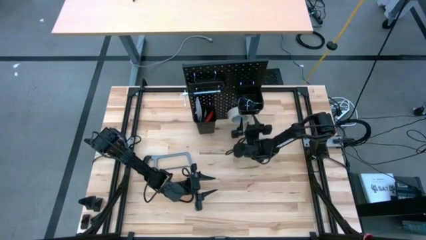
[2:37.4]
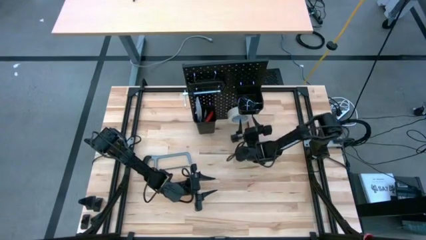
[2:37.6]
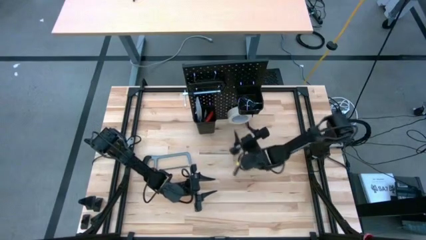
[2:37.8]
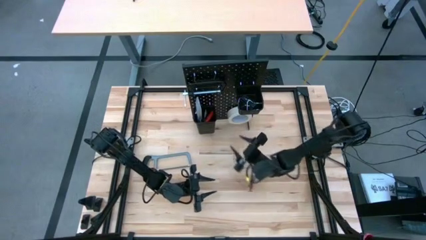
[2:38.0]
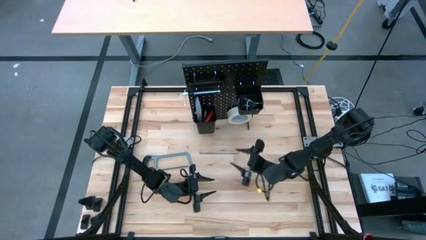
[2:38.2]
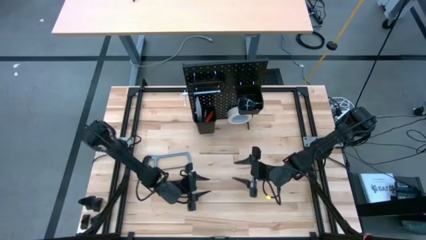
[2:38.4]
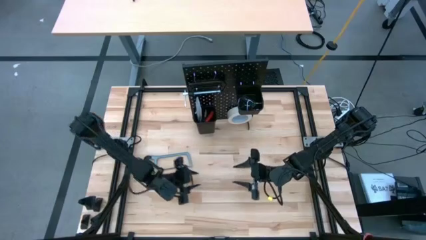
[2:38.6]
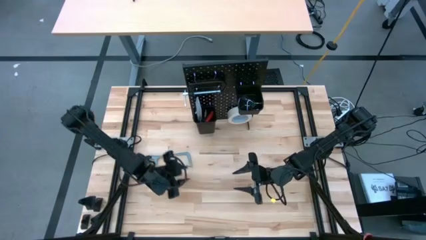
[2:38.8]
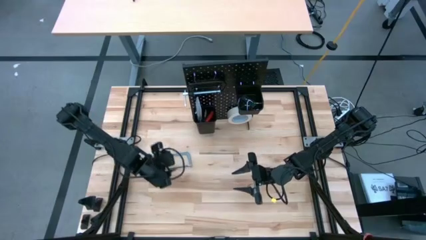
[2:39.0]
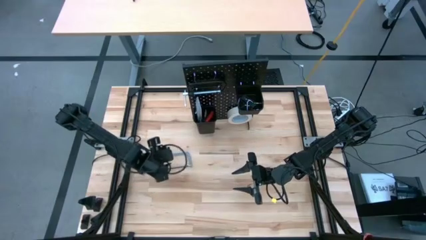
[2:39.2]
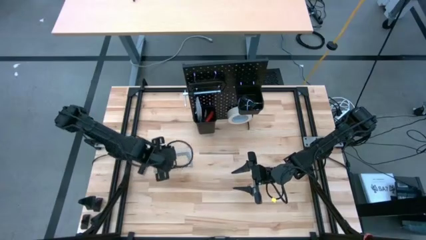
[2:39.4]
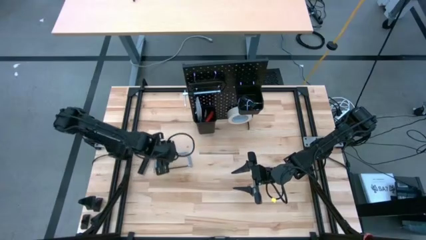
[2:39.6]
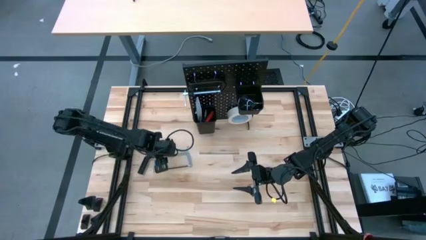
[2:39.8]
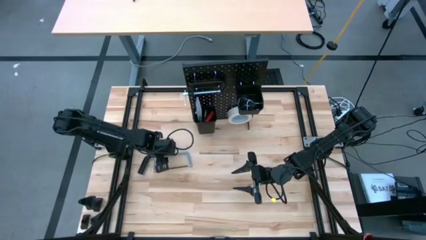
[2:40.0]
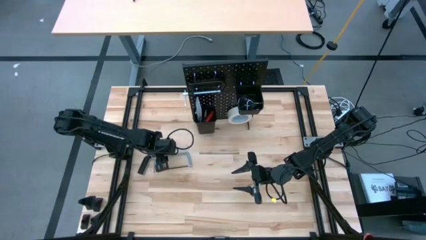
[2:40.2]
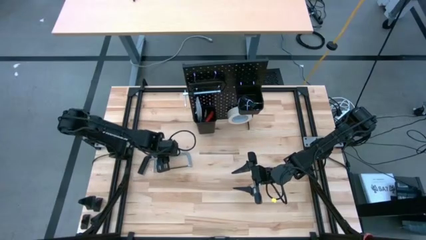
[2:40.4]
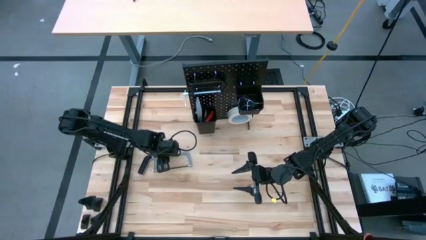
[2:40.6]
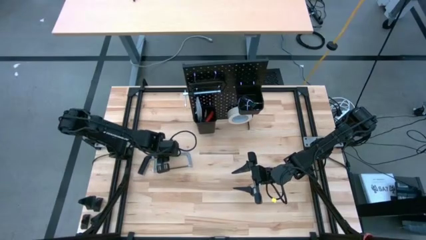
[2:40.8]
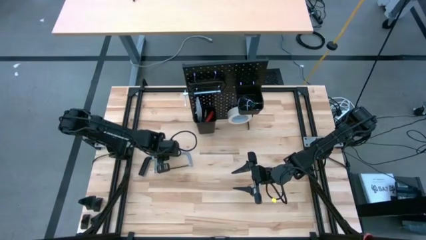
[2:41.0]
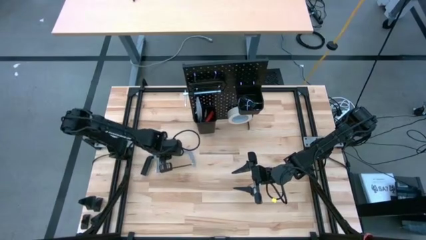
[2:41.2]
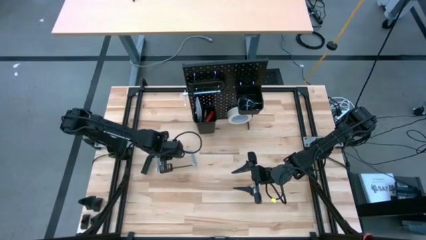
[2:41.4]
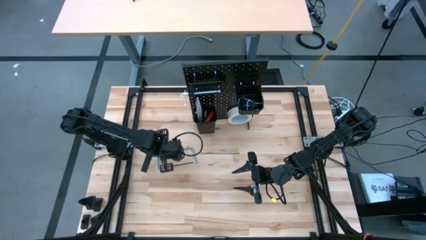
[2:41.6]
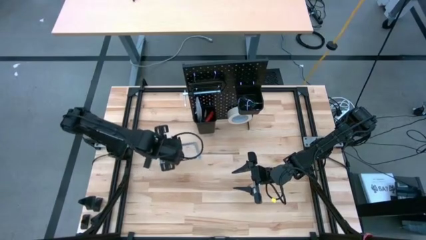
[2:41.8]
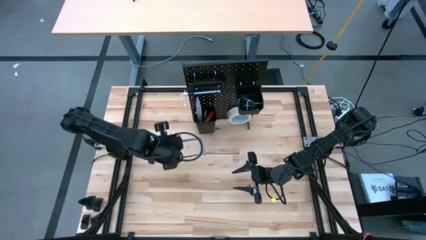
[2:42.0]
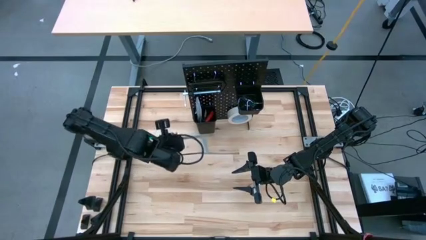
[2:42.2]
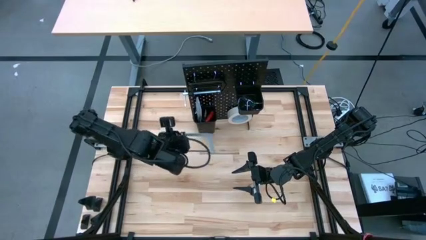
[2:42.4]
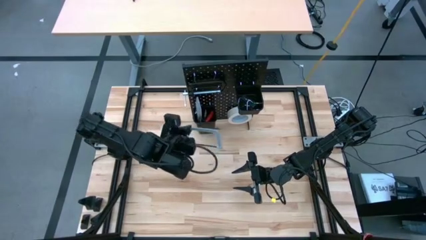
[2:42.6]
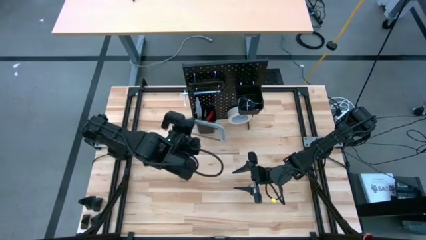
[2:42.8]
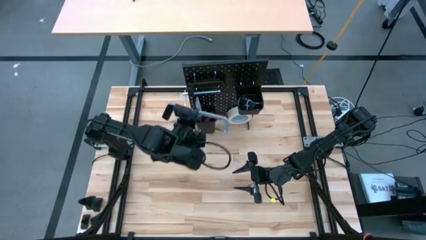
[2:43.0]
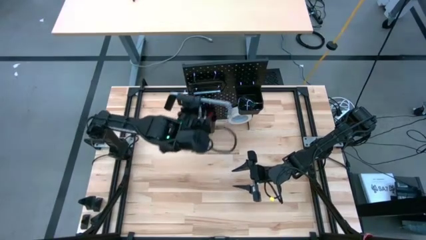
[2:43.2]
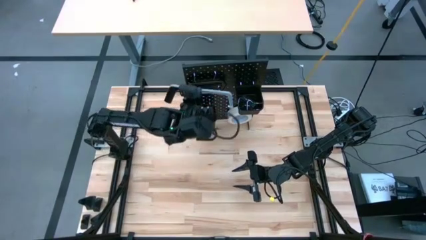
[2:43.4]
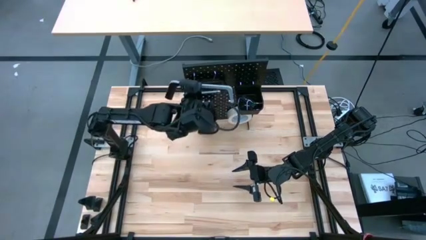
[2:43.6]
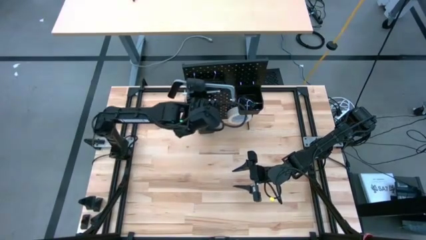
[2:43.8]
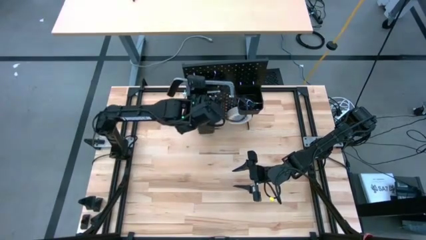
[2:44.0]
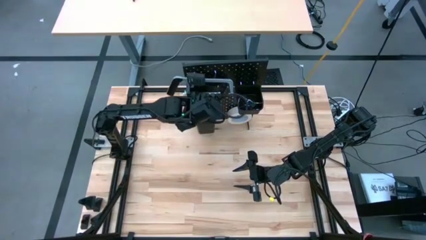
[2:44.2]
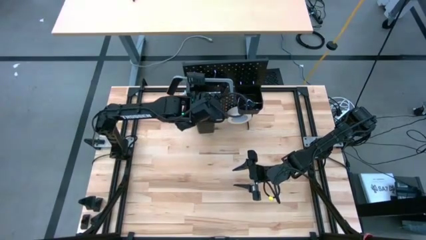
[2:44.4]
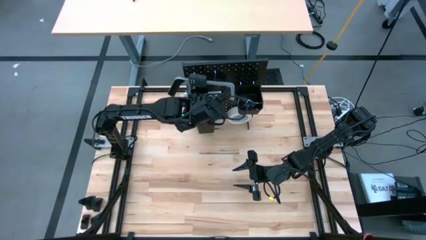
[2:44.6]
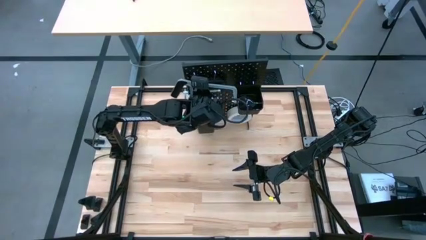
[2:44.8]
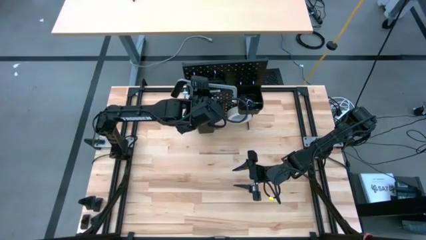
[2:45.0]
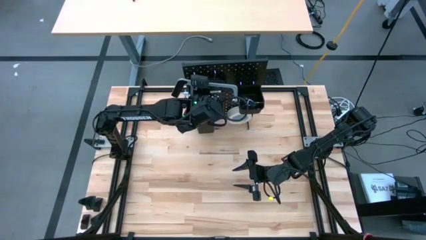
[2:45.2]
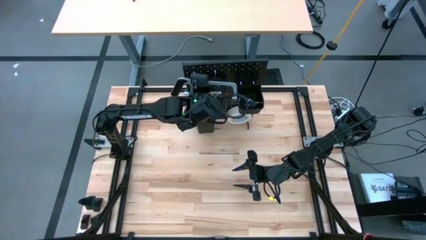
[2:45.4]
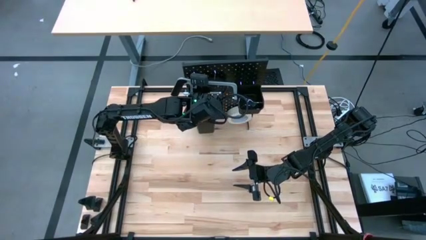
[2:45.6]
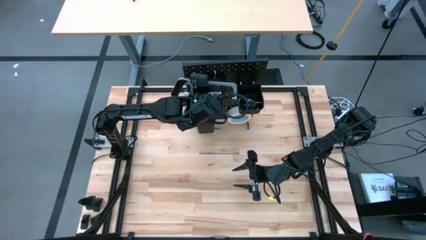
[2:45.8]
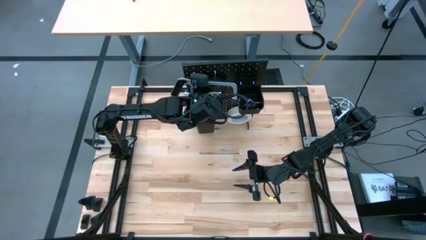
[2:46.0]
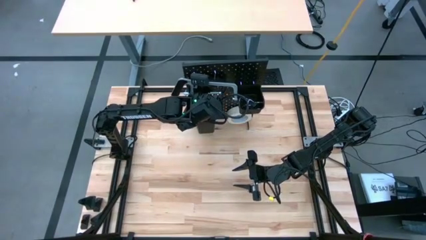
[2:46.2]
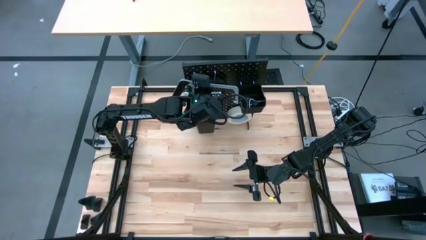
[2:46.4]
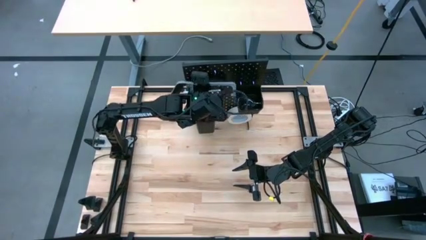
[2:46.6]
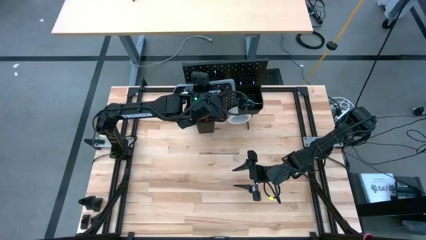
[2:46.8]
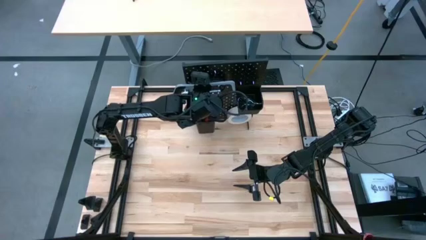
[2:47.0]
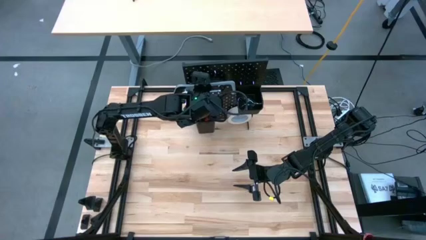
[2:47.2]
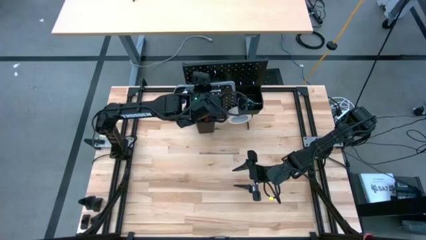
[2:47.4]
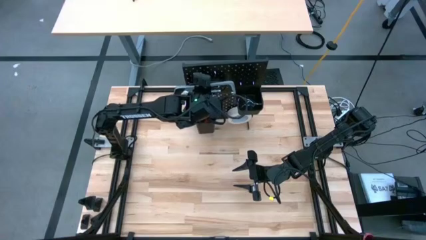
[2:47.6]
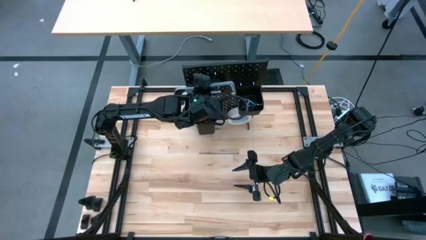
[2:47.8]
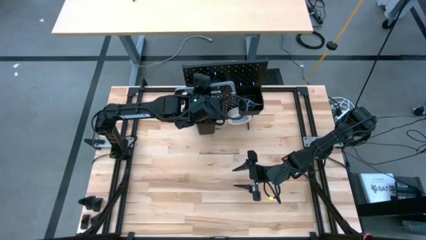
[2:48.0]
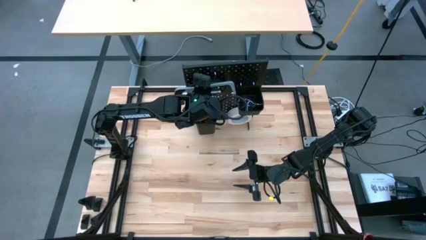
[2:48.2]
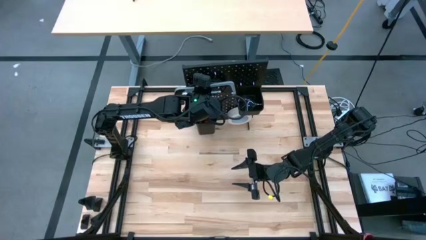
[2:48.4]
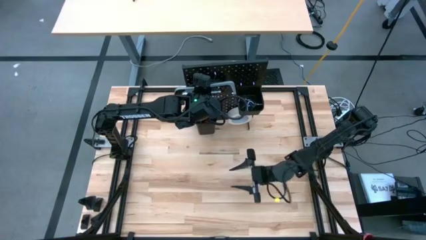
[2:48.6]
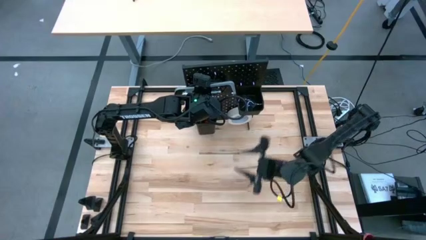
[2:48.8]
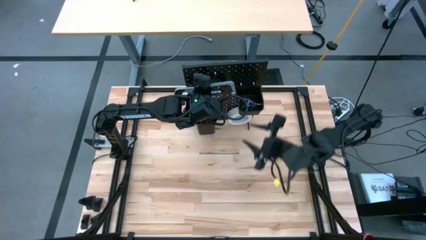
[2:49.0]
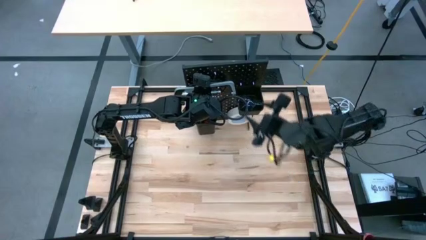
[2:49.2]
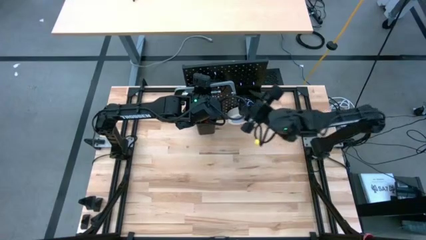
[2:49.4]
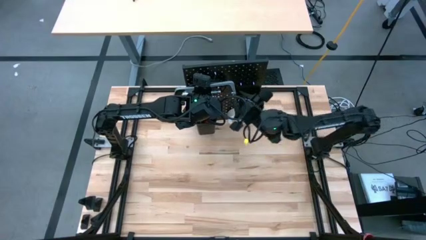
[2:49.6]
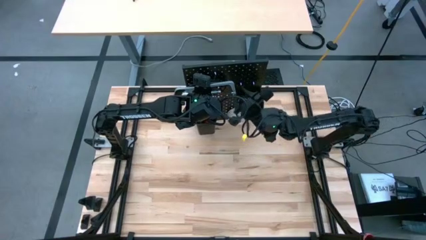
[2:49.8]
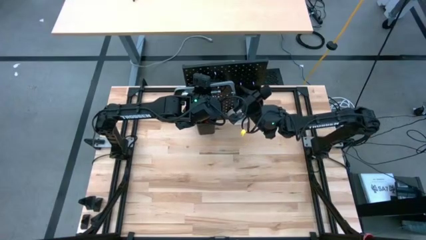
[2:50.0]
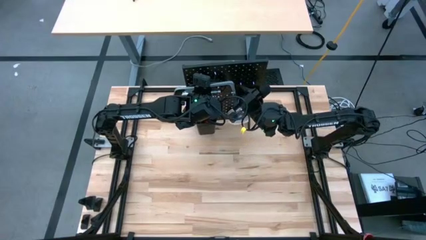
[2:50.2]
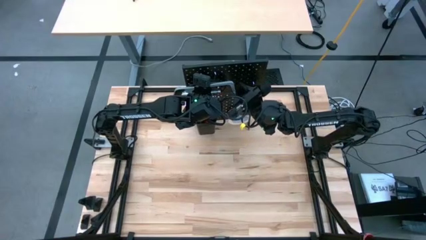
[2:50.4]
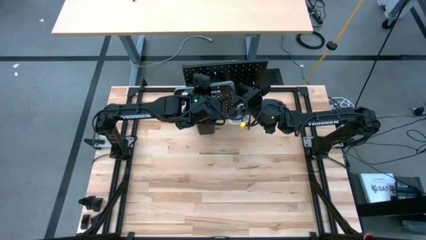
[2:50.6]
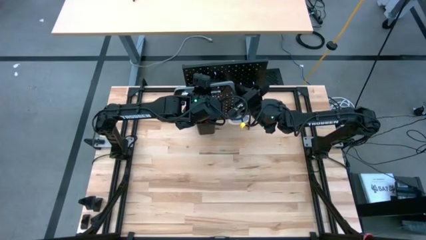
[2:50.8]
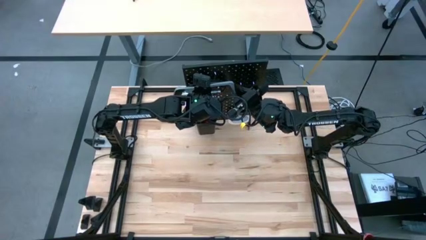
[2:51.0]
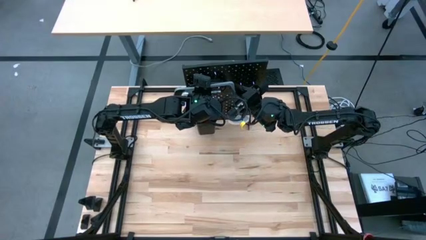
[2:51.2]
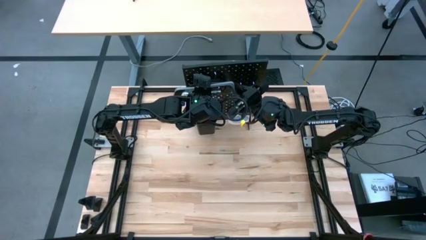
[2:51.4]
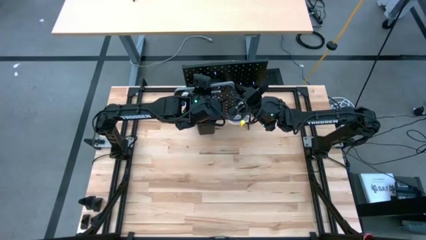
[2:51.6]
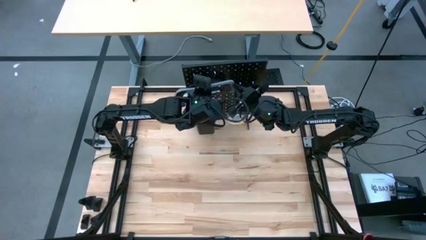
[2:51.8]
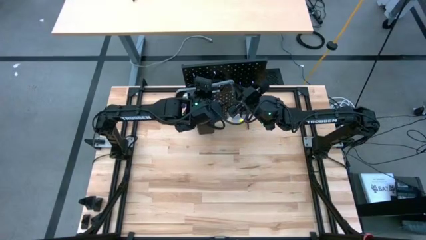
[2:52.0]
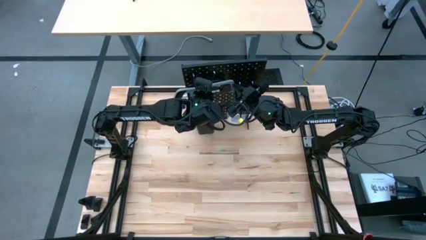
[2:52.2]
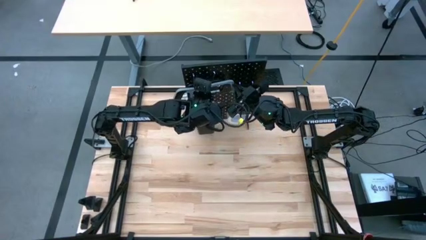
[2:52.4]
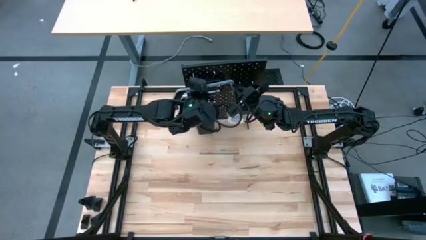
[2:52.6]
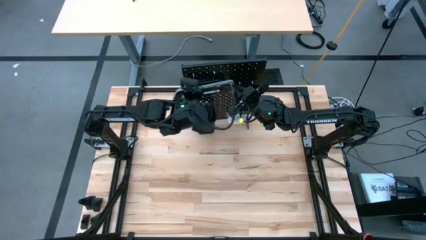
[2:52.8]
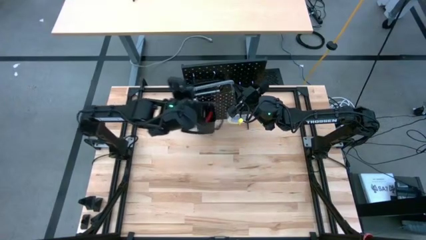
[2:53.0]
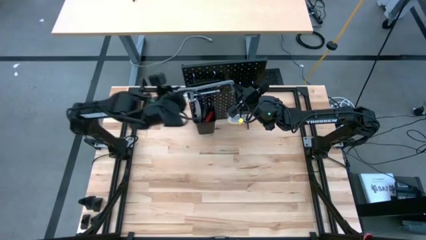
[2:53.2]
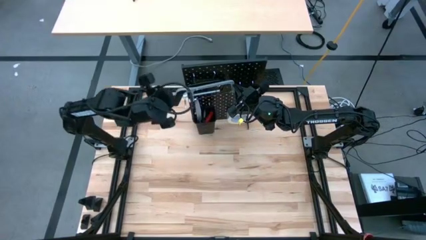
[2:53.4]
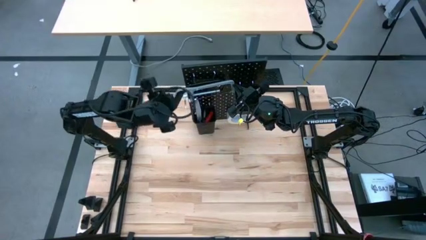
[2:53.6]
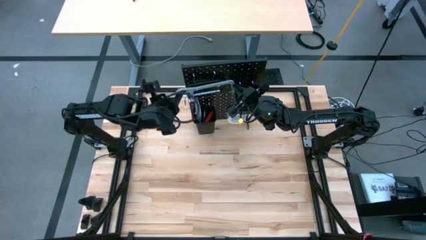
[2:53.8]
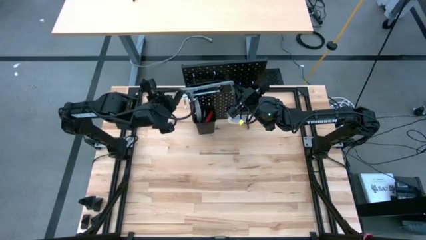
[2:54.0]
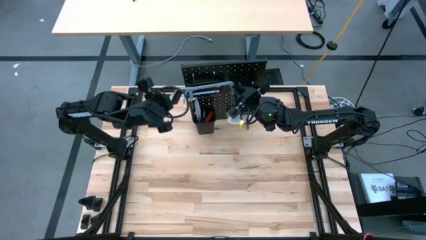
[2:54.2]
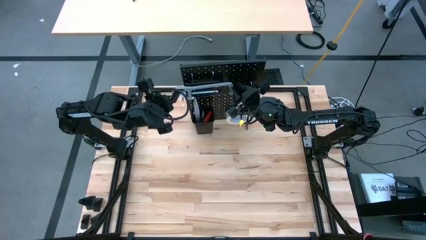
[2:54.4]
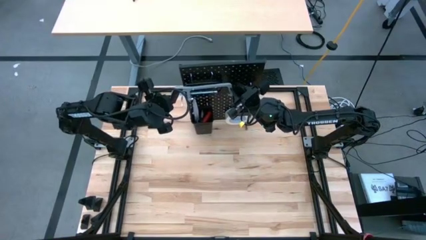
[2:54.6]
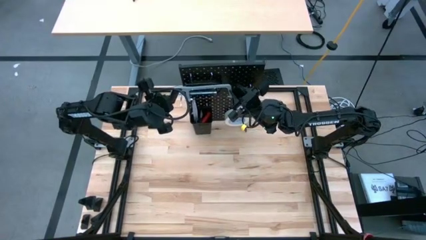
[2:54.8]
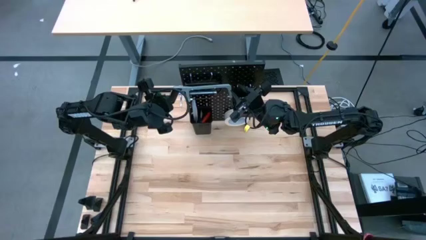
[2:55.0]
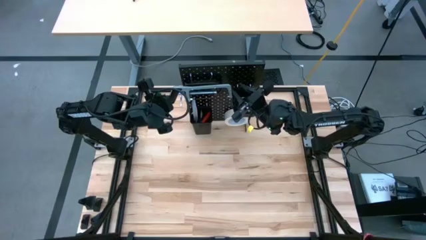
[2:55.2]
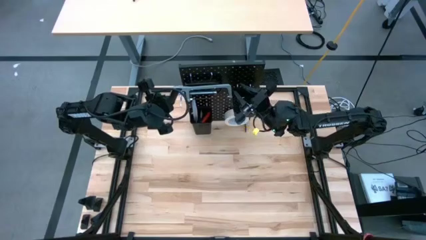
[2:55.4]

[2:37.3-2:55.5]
Task: Hang tools onto peg board
Hang the hacksaw on the pegboard
